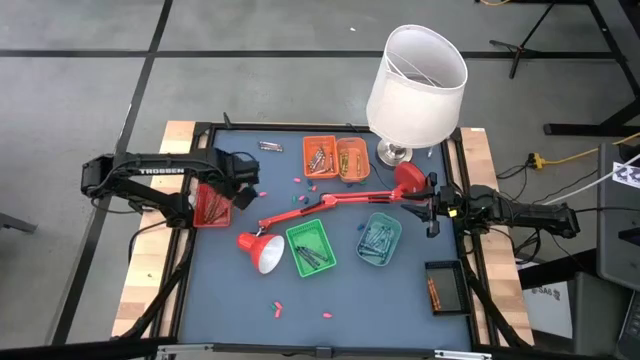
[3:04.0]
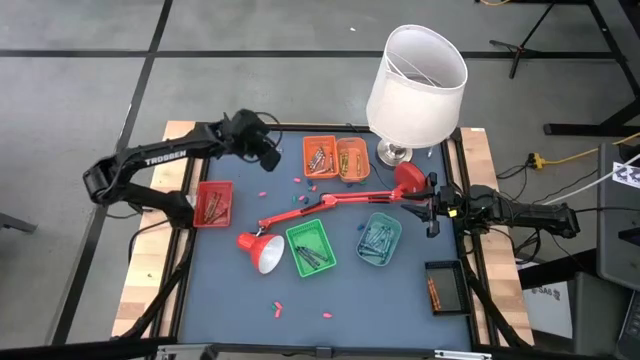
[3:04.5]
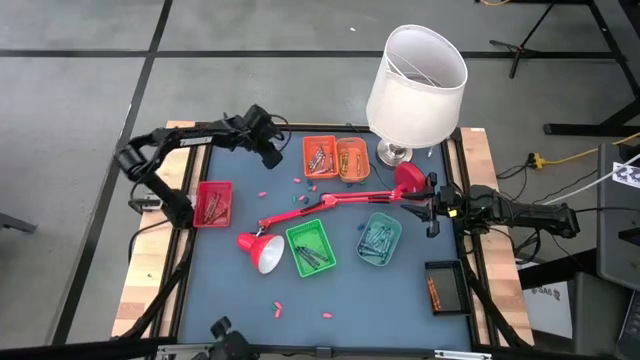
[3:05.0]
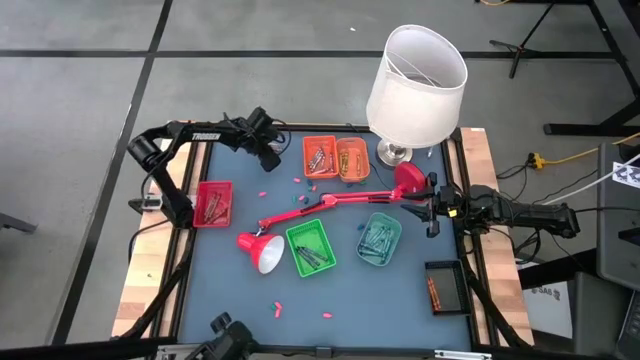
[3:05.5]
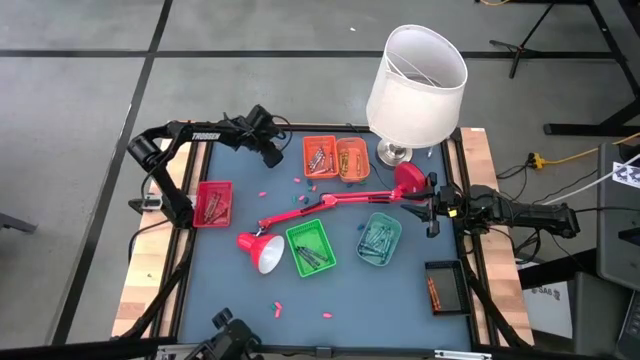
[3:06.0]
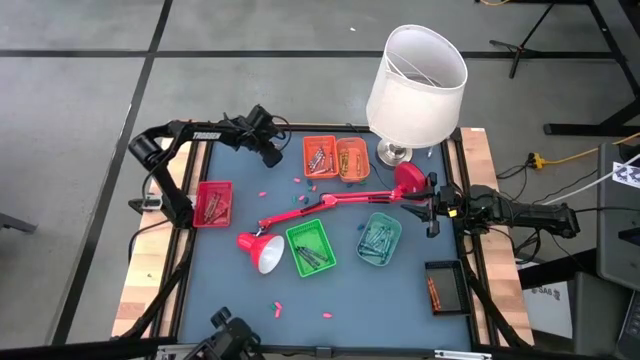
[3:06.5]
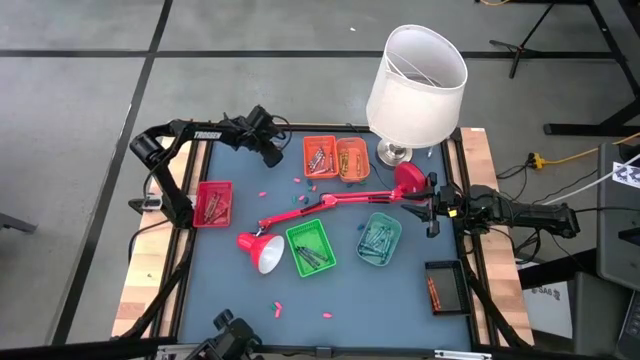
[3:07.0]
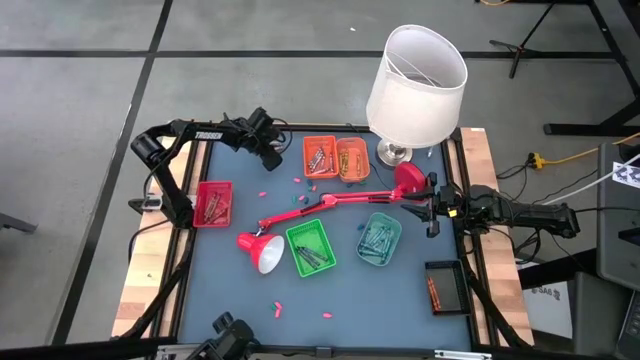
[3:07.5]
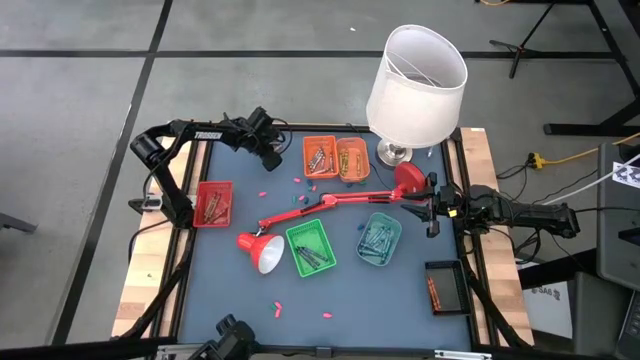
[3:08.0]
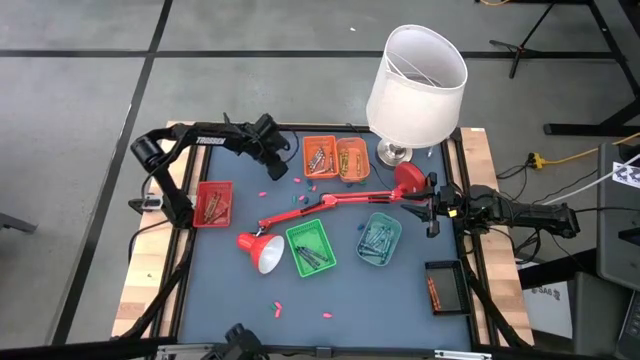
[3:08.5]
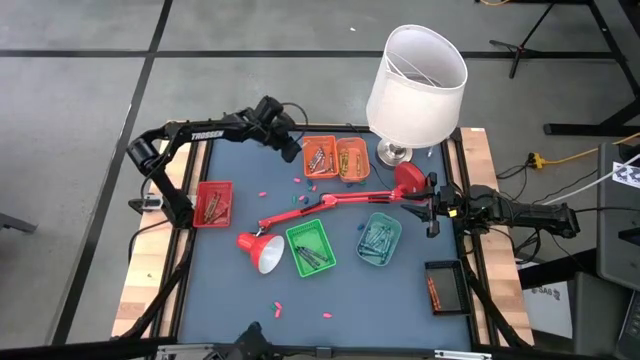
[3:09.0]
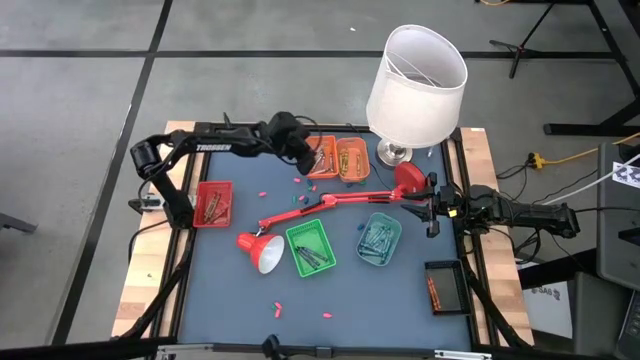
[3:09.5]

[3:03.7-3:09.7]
Task: Sort crayons
Put the gray crayon into the orange bin

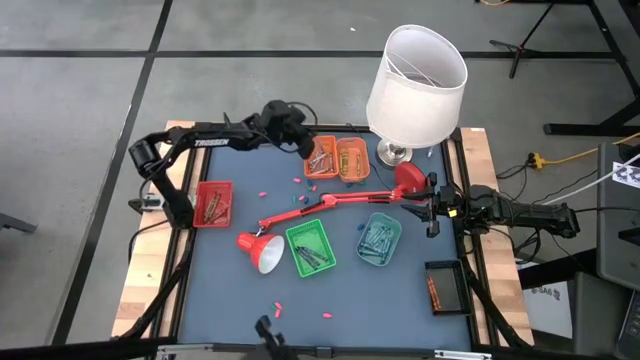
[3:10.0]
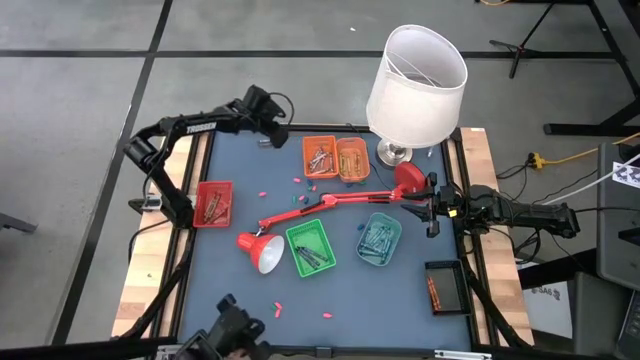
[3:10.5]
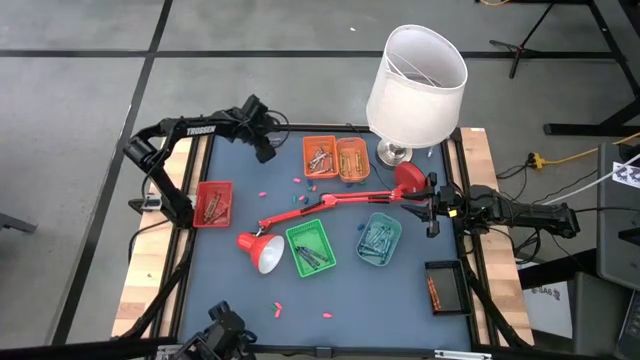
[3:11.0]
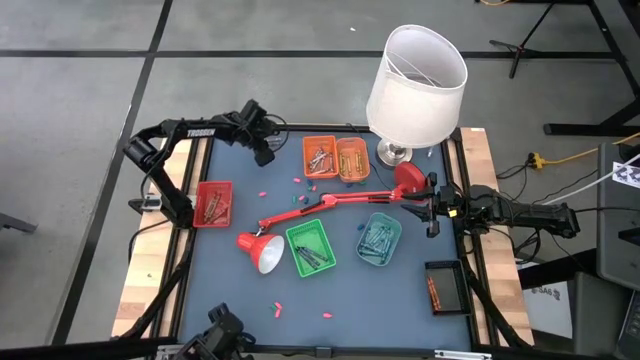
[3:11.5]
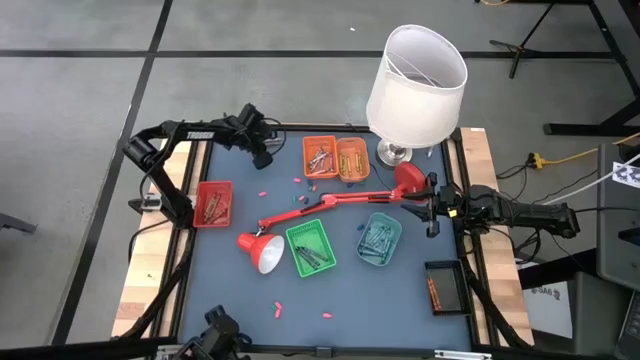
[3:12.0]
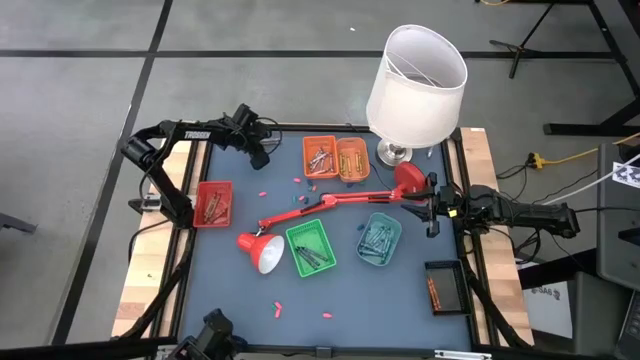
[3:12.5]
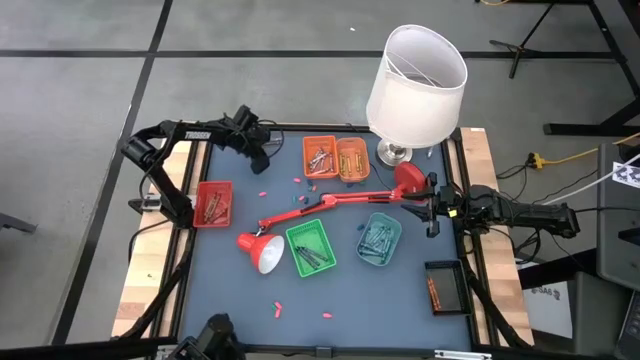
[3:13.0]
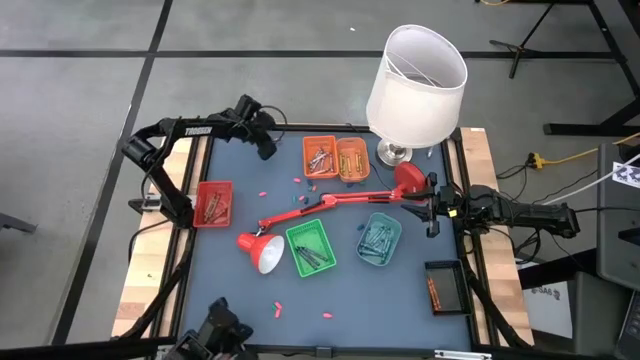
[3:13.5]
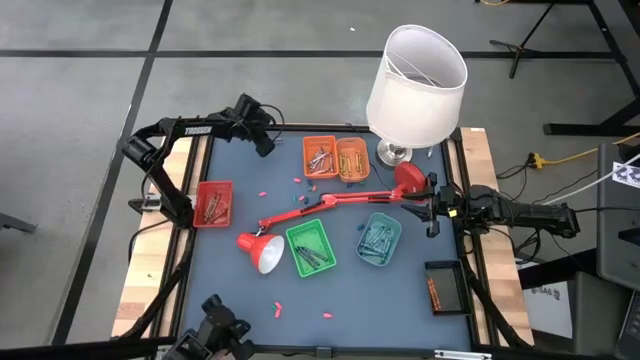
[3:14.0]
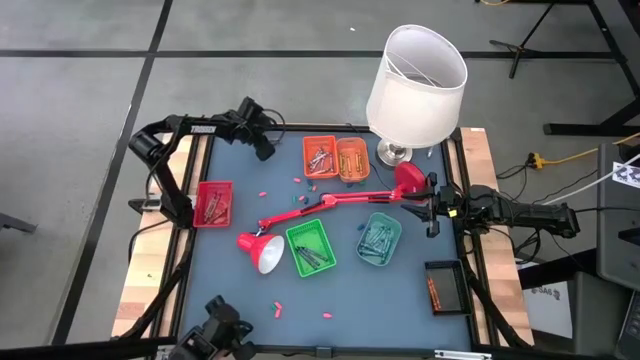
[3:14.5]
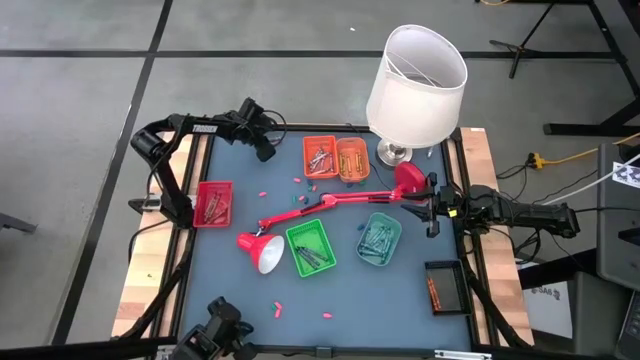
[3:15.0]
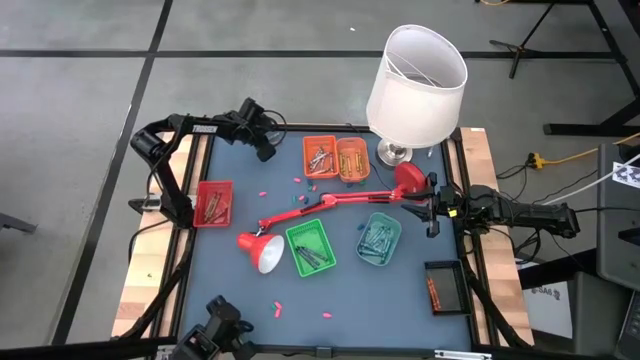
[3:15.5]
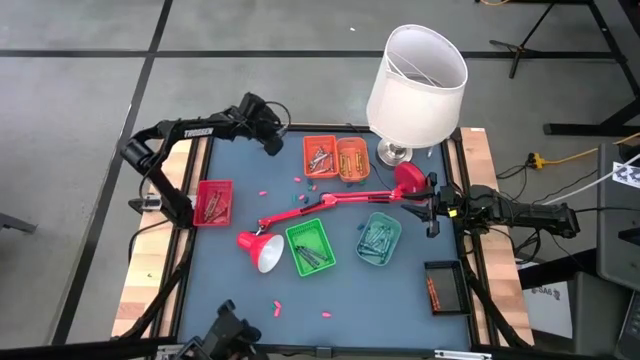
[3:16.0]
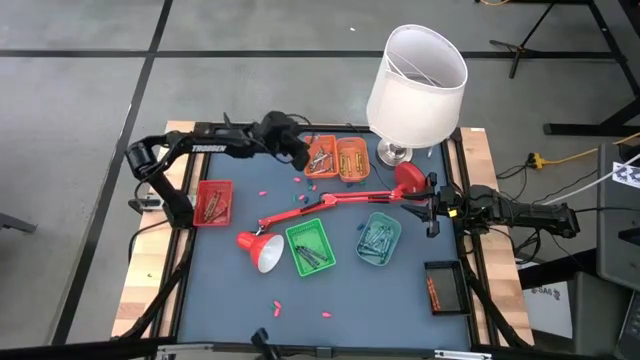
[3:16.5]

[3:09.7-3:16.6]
Put the gray crayon into the orange bin

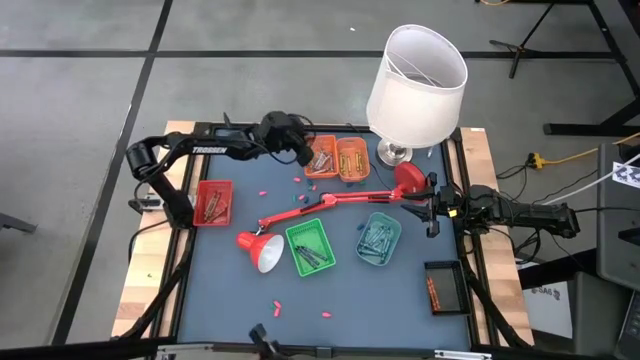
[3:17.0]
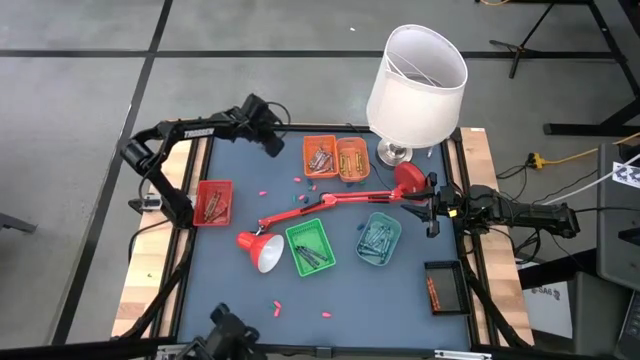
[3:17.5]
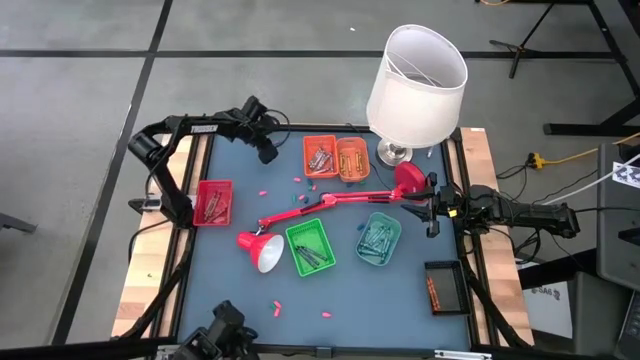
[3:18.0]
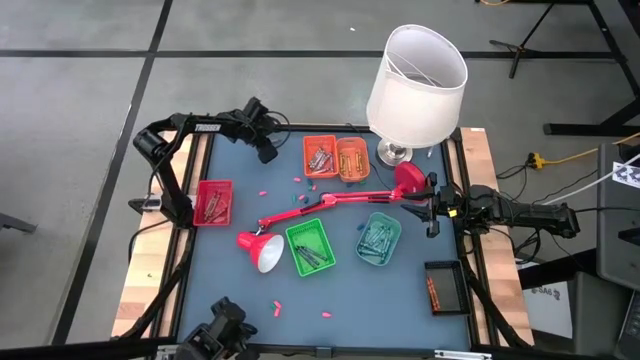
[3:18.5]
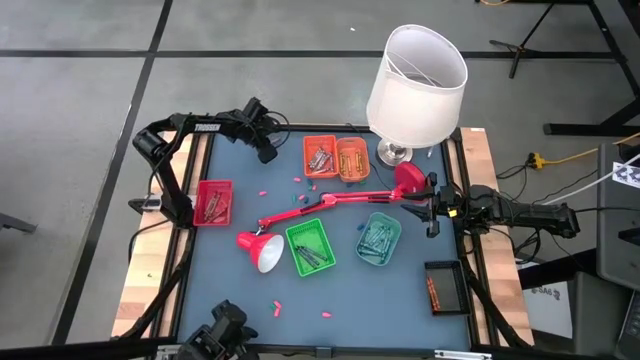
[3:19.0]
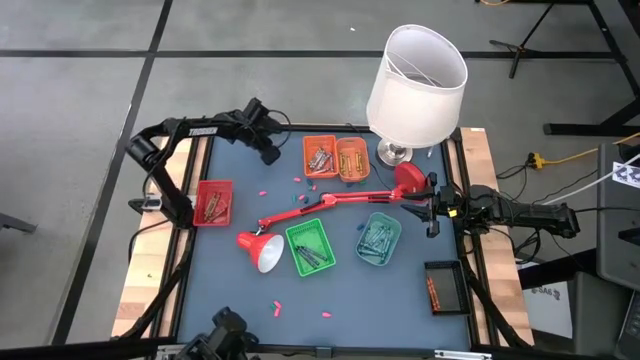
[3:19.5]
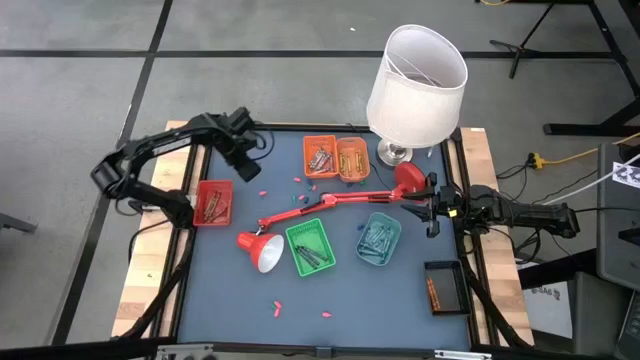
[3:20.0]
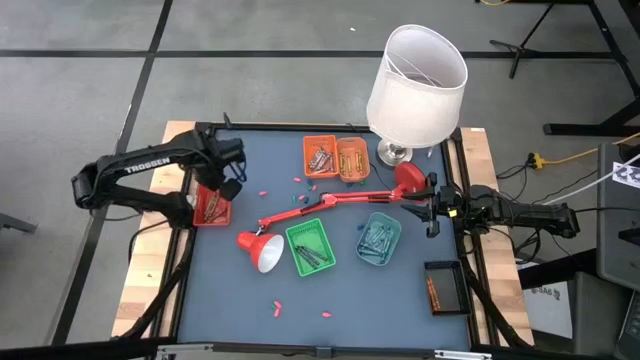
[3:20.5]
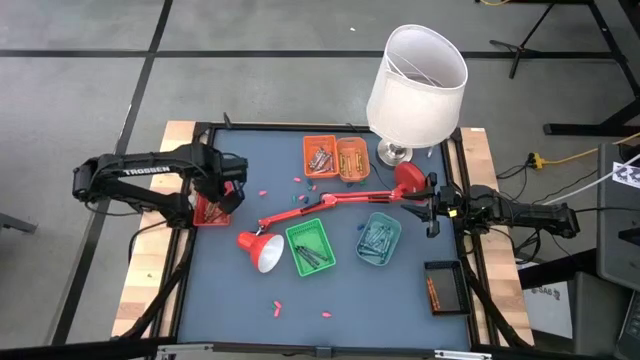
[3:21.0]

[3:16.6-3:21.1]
Put the brown crayon into the red bin

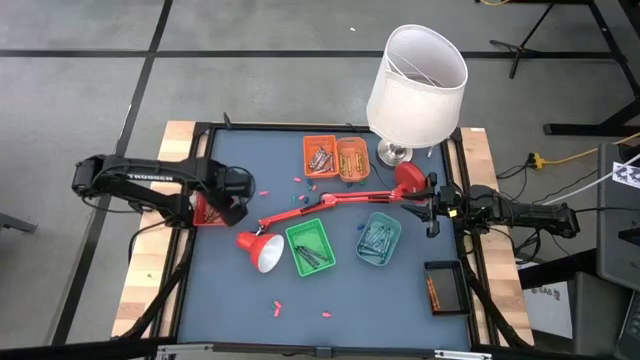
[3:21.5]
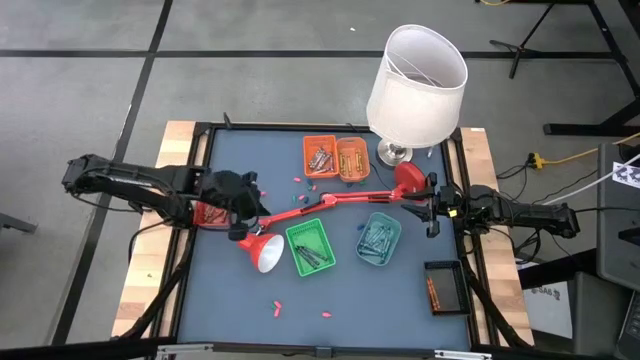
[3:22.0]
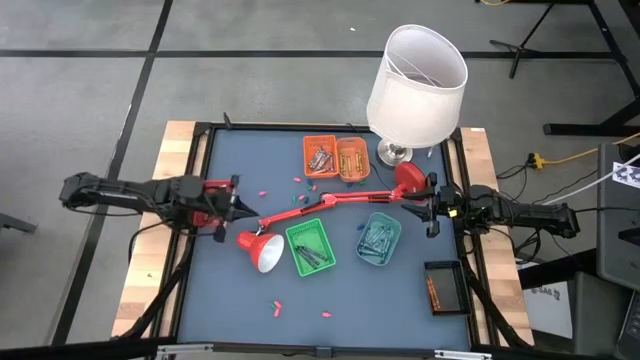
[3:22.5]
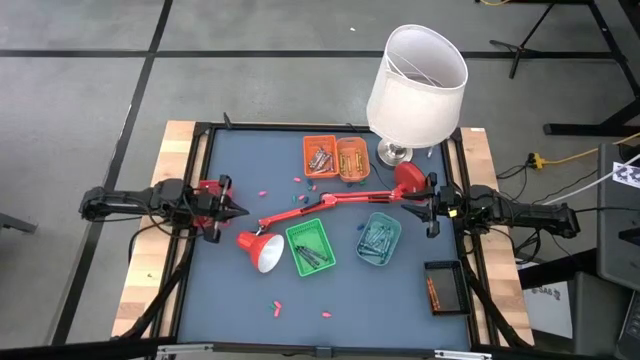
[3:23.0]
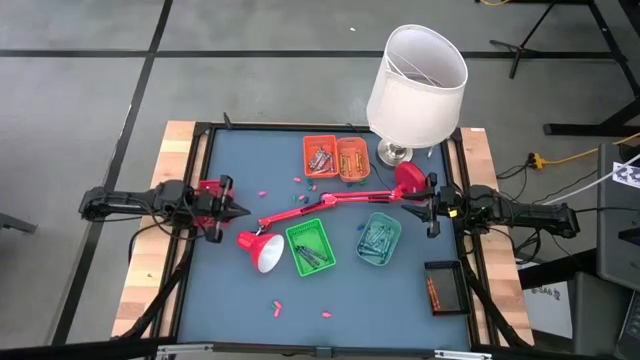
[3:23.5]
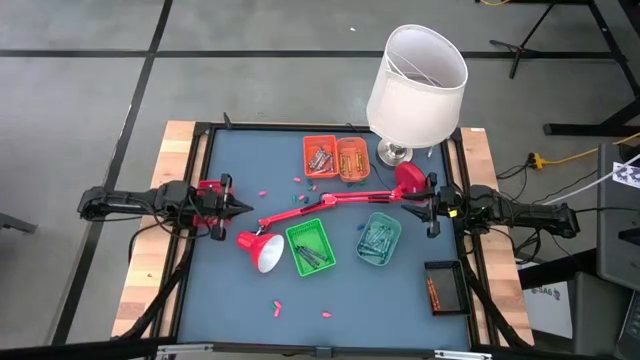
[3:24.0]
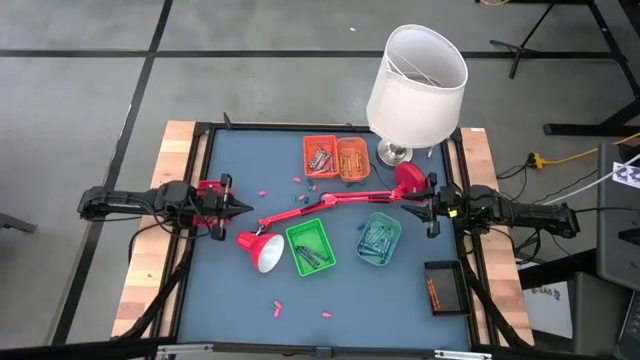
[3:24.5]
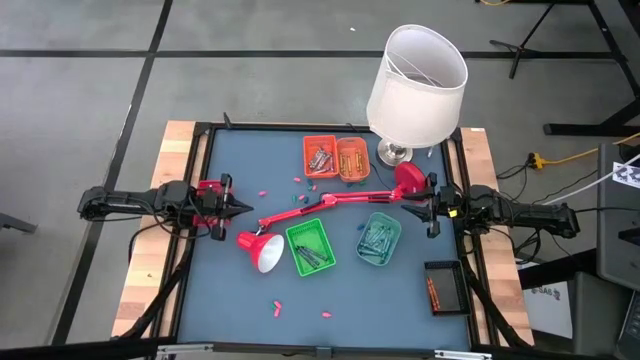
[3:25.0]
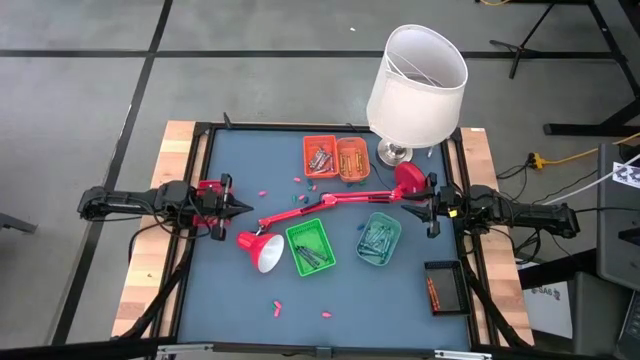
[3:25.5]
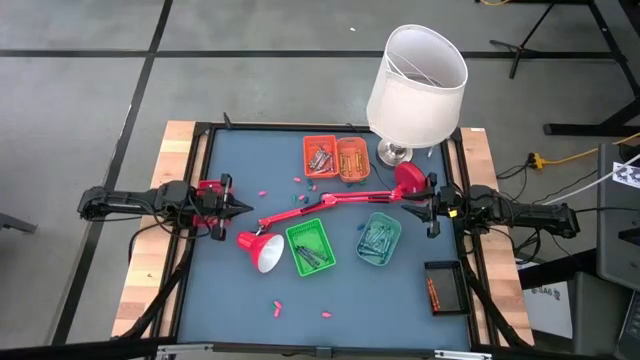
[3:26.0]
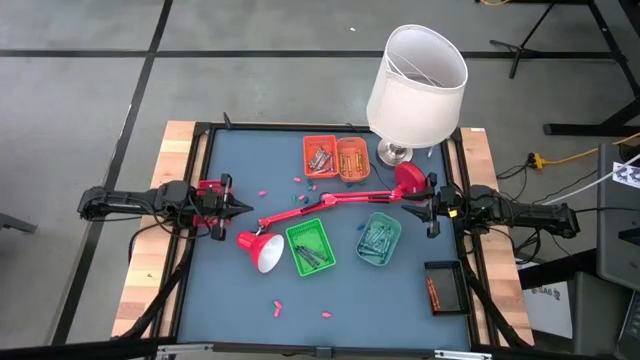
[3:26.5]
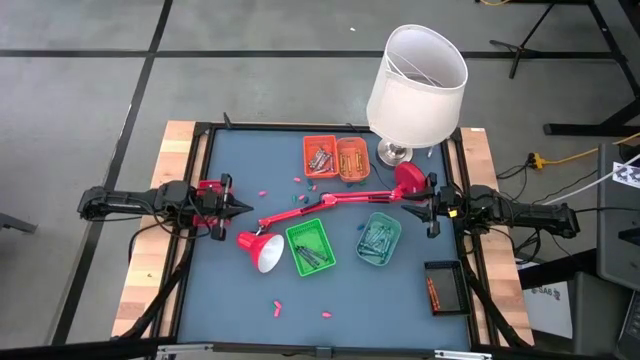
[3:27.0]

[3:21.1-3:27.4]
Return to Home Position
